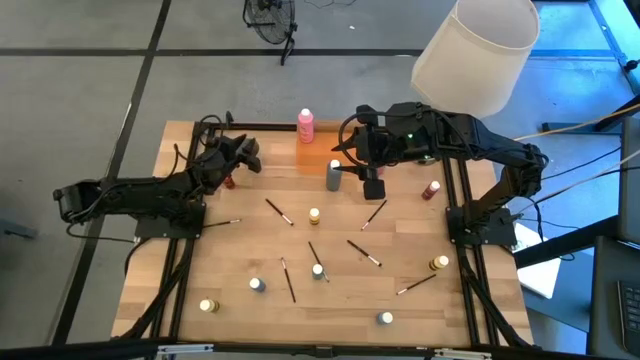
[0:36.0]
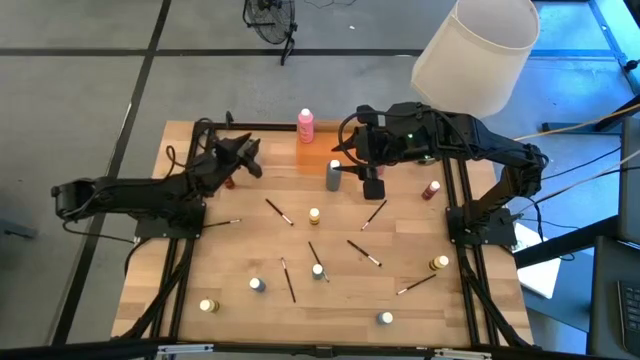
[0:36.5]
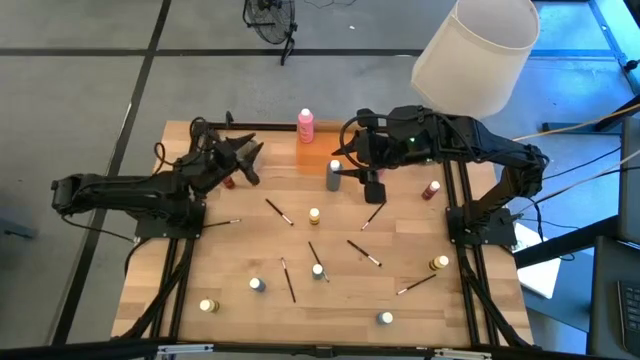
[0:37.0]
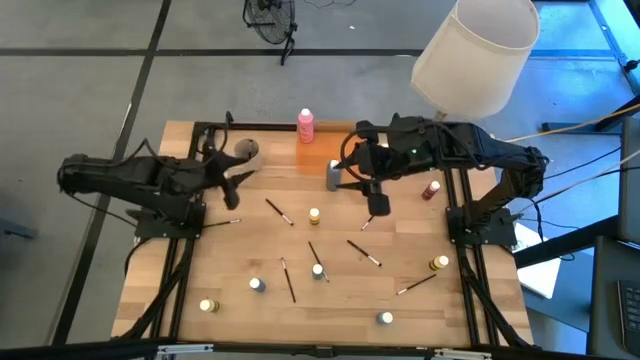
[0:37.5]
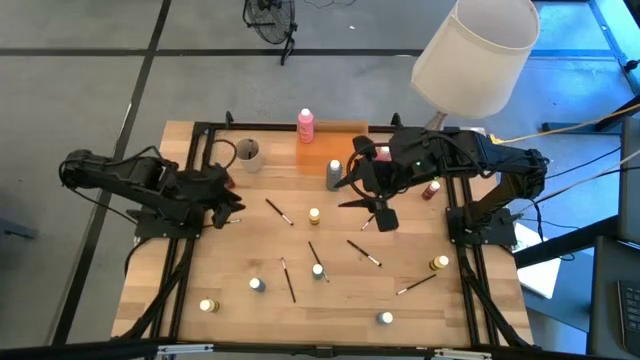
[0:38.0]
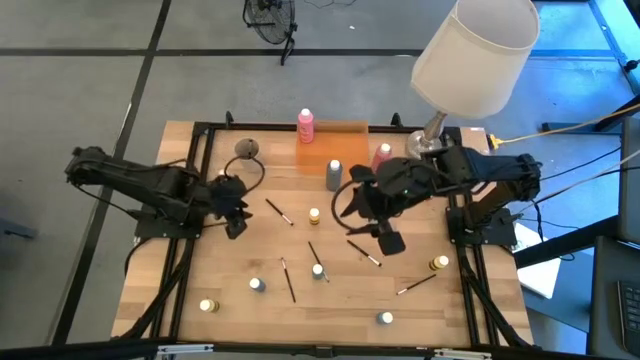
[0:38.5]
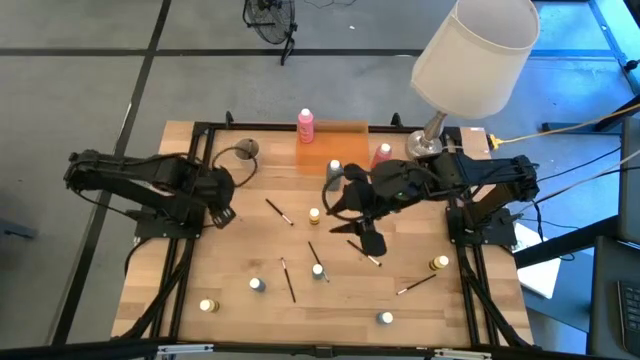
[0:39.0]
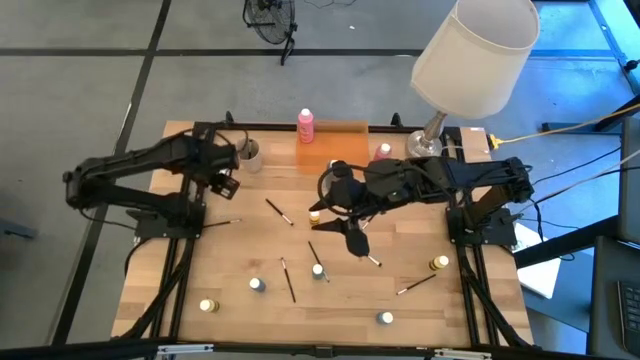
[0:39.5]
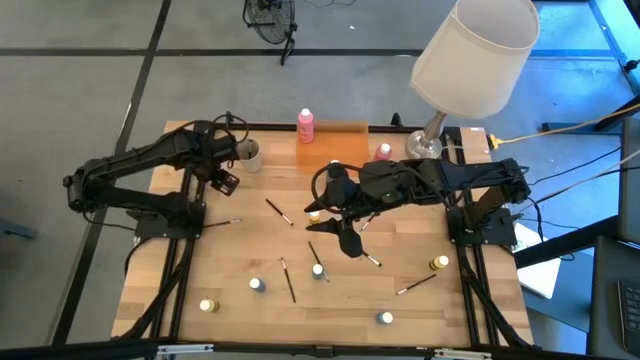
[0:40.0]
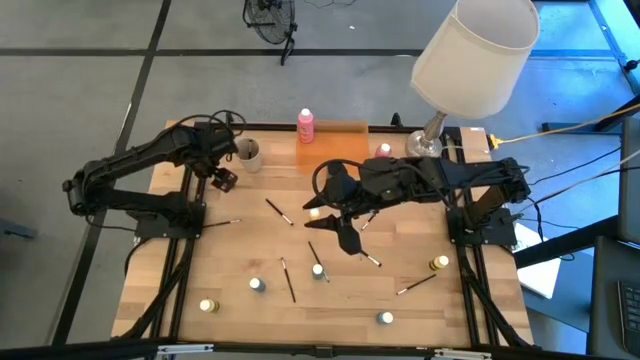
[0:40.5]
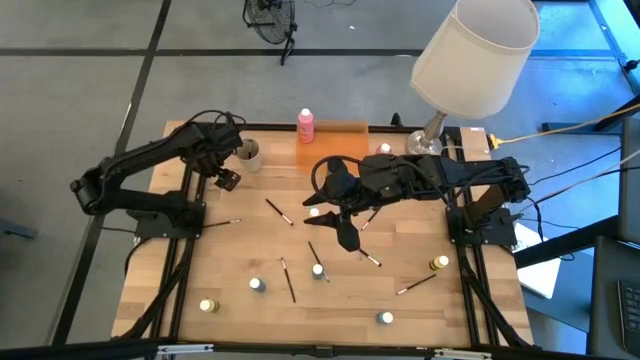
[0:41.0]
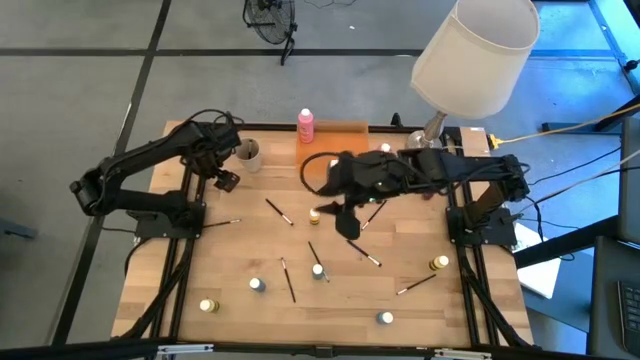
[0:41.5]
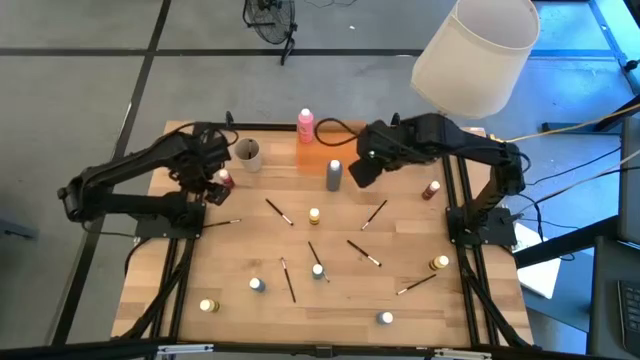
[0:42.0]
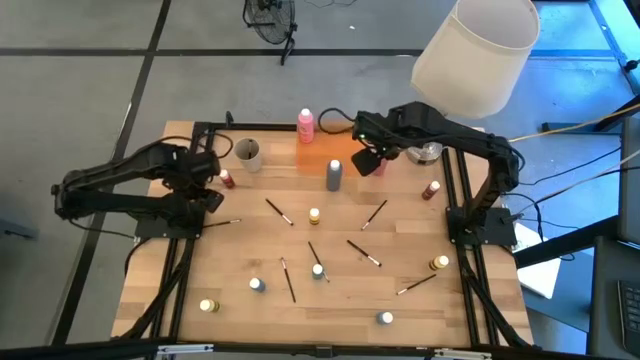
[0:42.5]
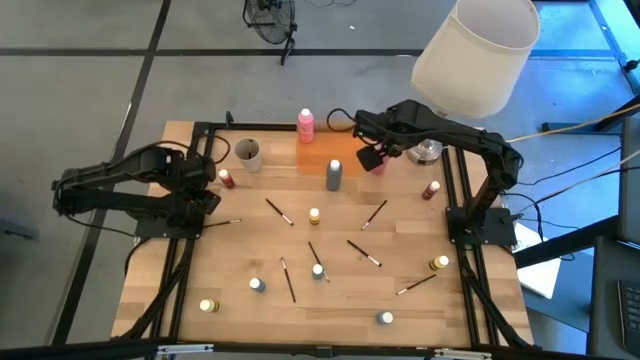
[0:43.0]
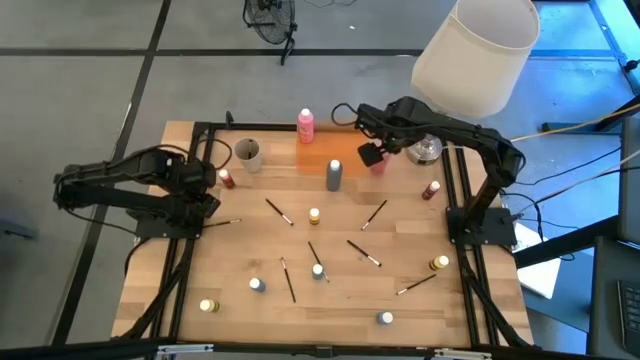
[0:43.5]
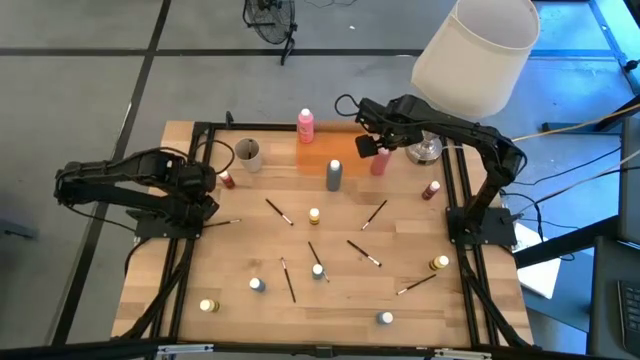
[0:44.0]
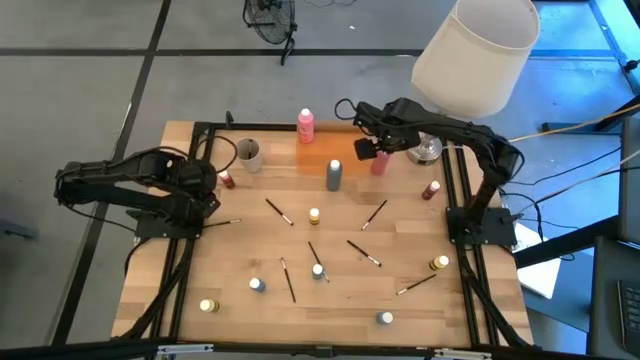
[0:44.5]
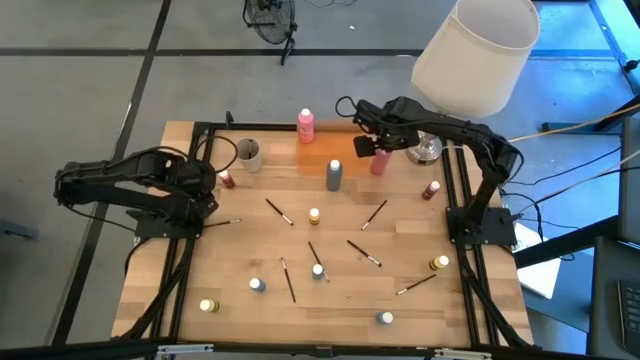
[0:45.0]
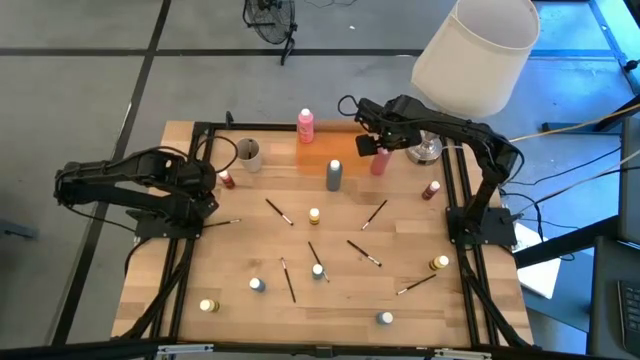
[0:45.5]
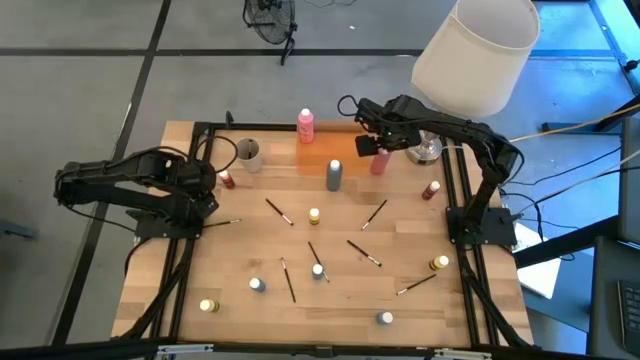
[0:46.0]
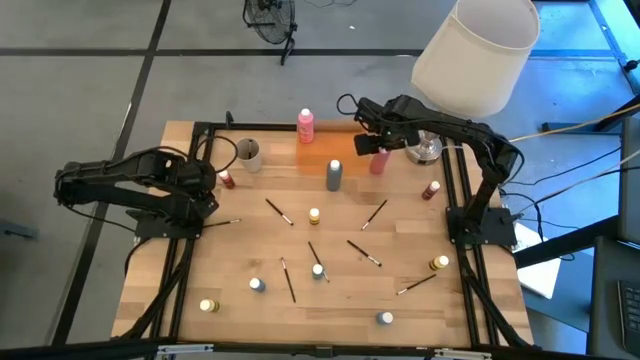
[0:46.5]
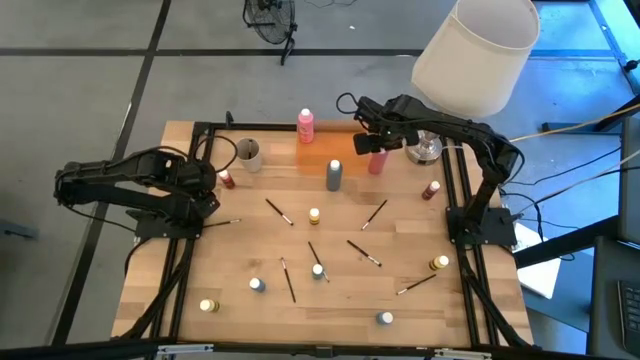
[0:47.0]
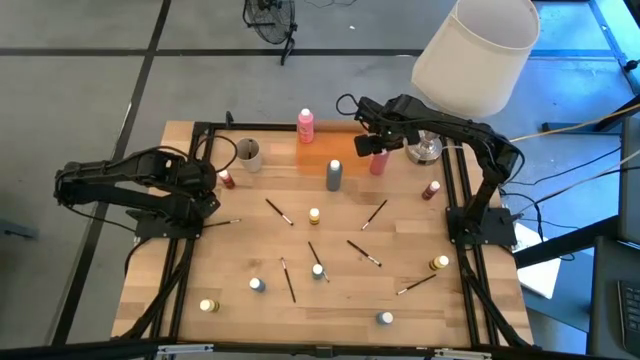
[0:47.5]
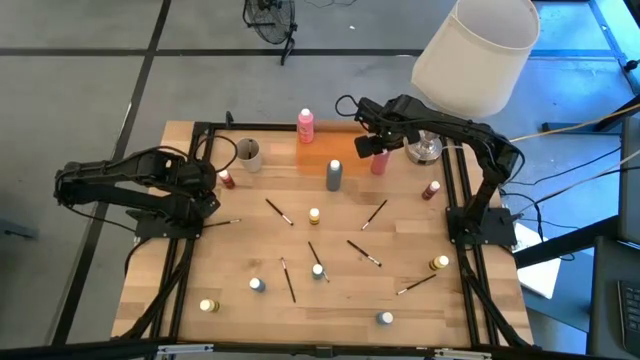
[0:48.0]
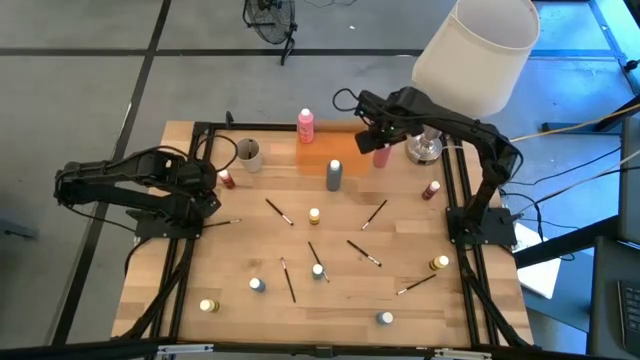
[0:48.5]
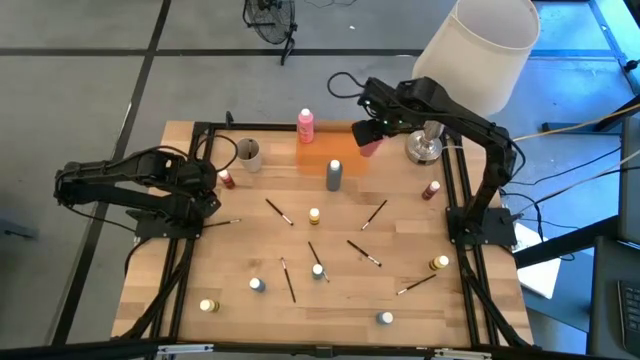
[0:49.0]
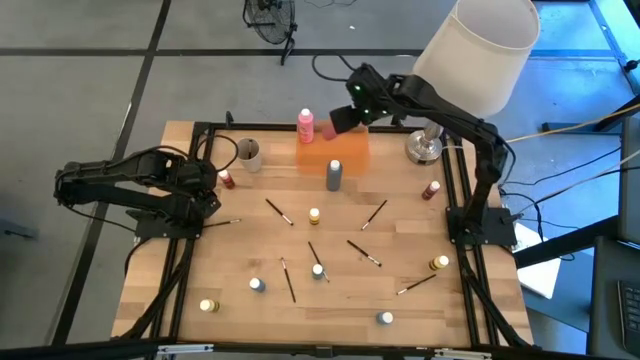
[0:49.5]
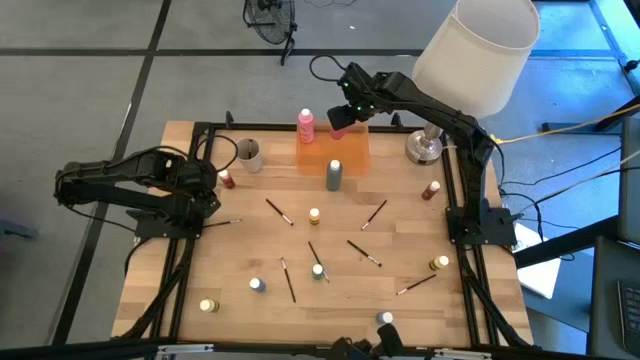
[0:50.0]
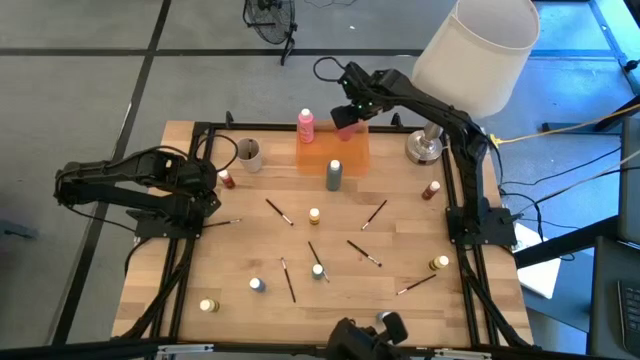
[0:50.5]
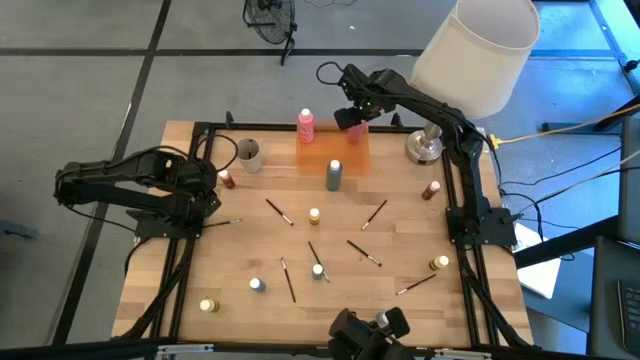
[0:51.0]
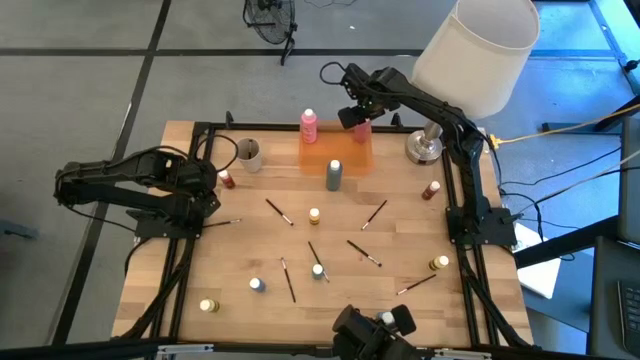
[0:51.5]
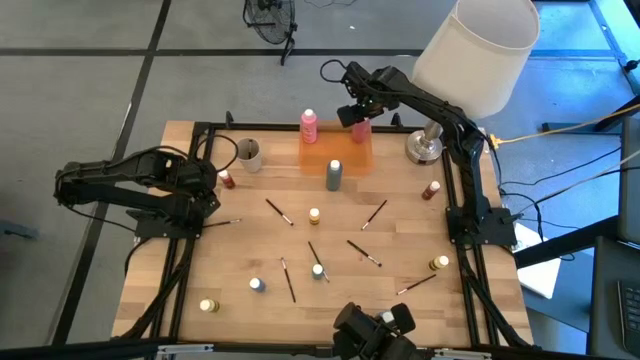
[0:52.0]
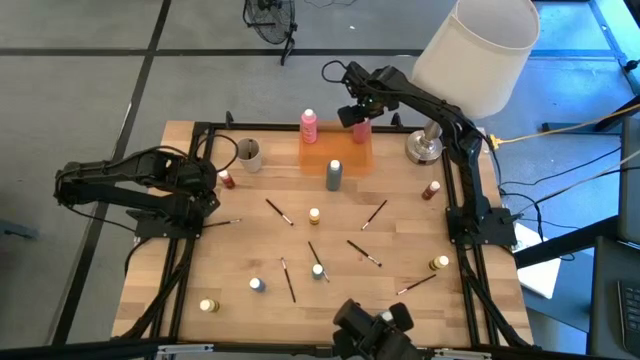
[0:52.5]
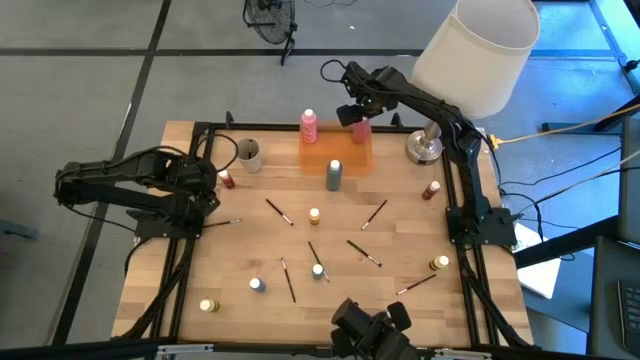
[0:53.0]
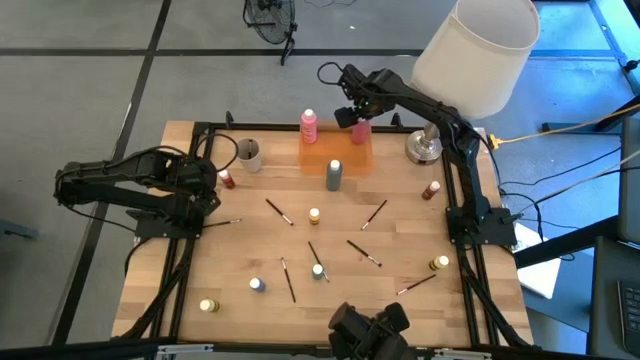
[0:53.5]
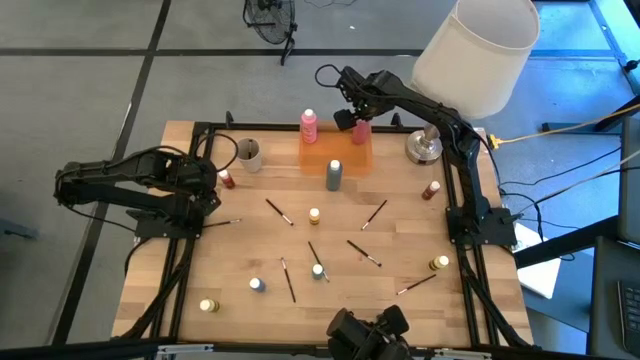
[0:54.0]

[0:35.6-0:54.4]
Task: Pick & Place Paint Supplies
Put the red paint bottle into the orange bin
